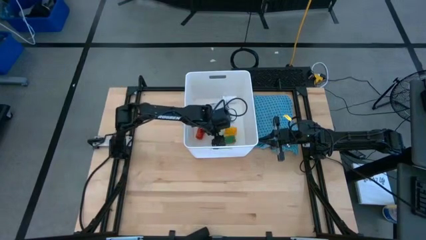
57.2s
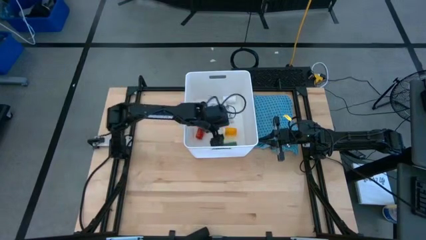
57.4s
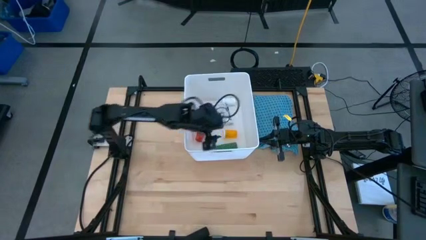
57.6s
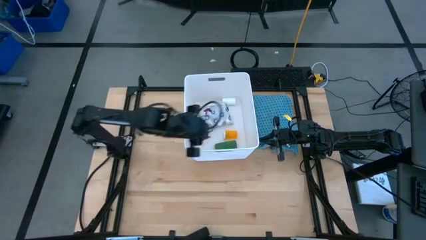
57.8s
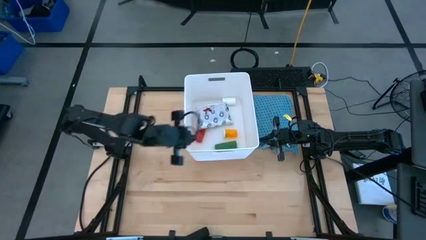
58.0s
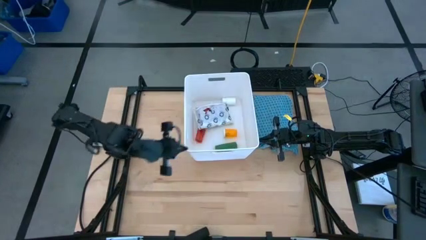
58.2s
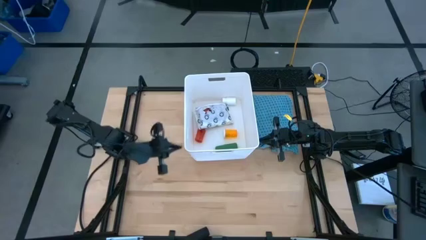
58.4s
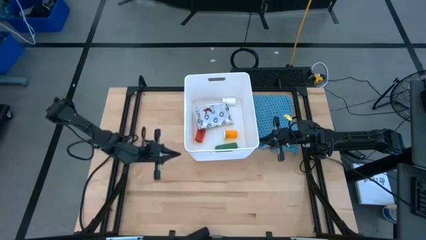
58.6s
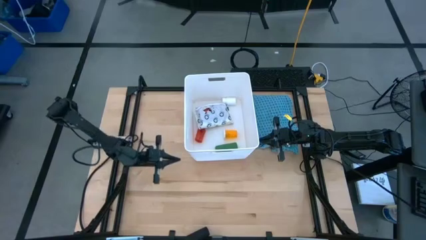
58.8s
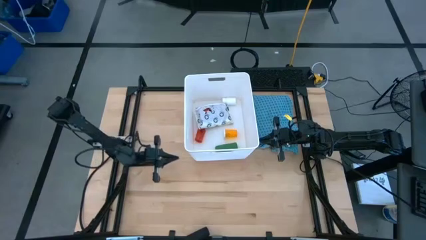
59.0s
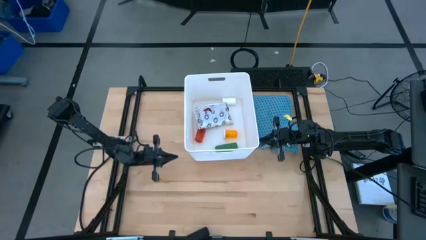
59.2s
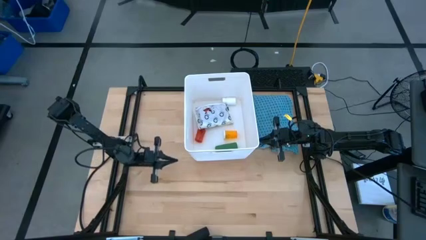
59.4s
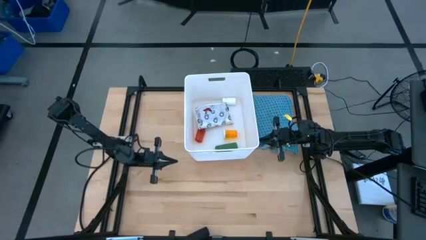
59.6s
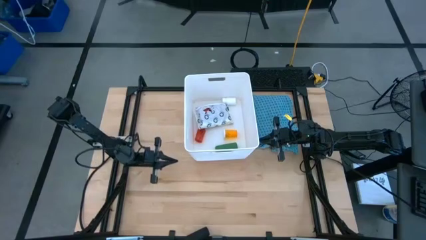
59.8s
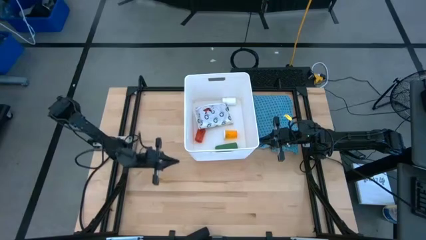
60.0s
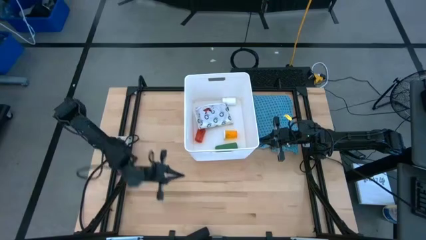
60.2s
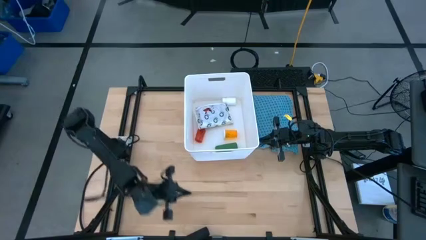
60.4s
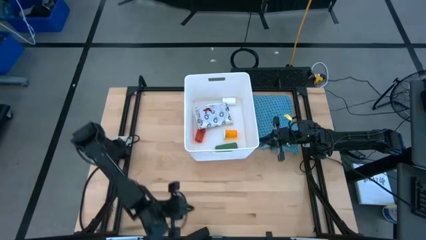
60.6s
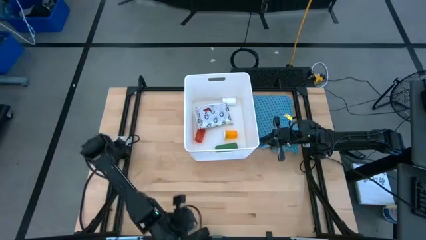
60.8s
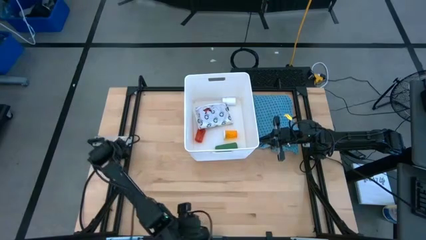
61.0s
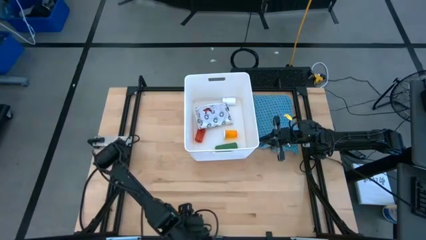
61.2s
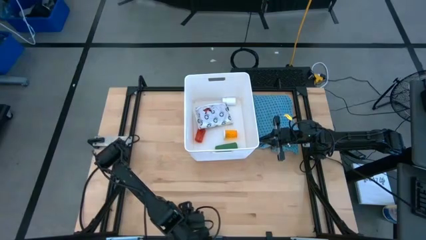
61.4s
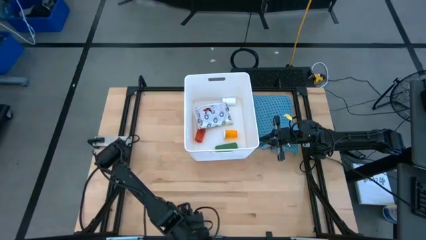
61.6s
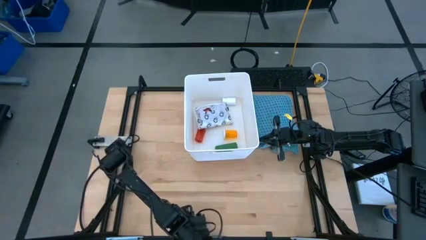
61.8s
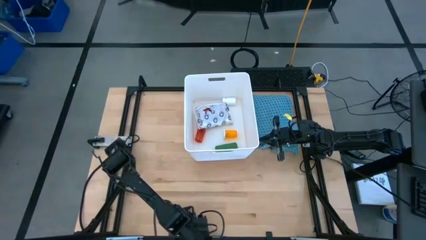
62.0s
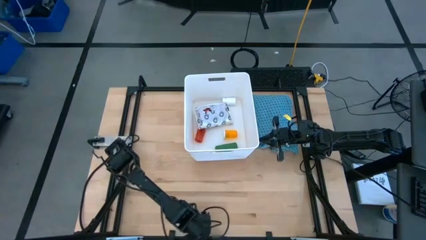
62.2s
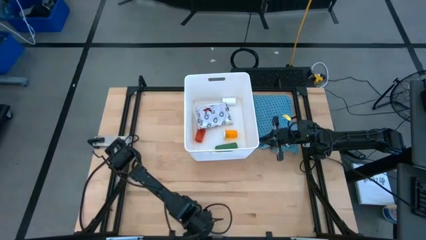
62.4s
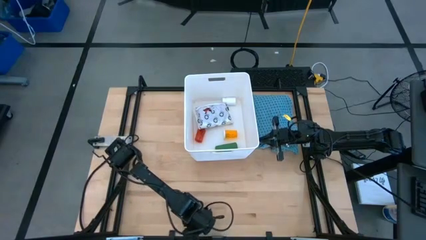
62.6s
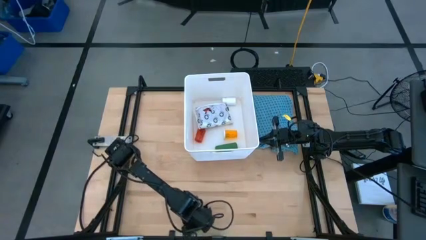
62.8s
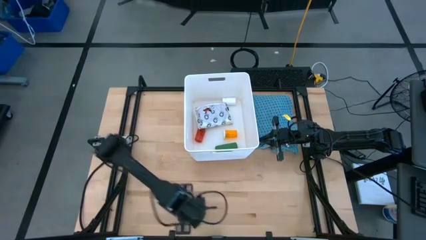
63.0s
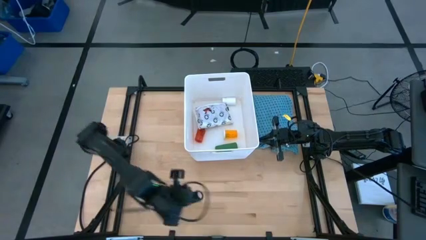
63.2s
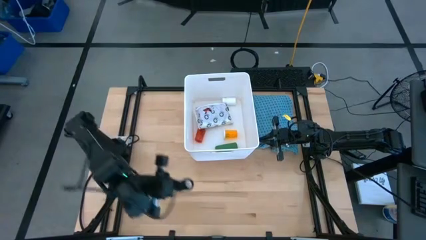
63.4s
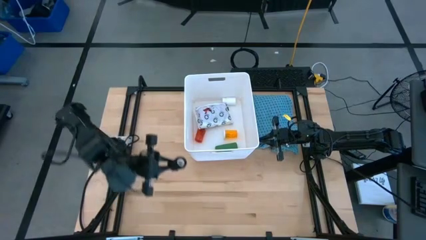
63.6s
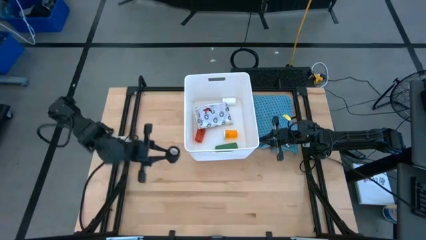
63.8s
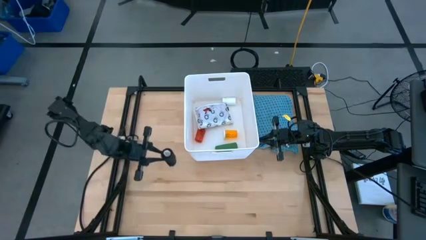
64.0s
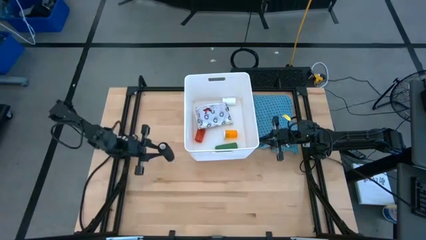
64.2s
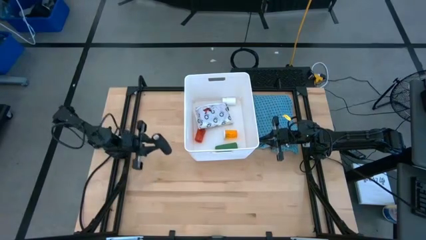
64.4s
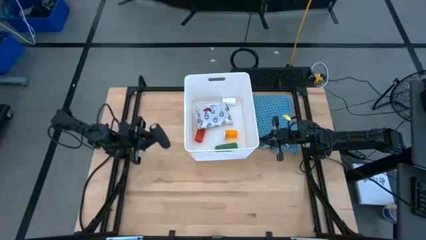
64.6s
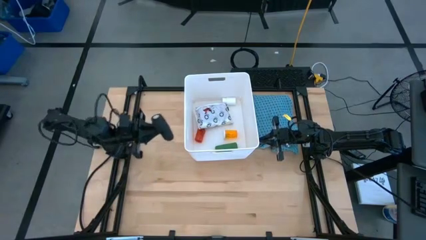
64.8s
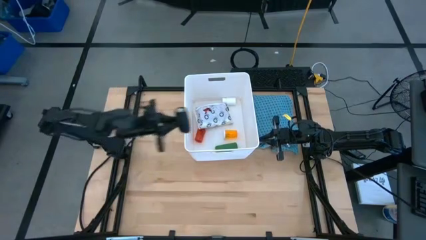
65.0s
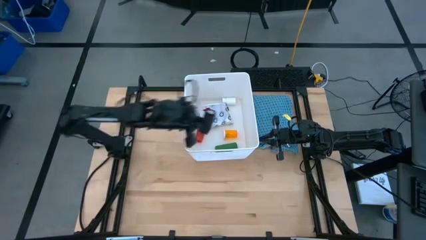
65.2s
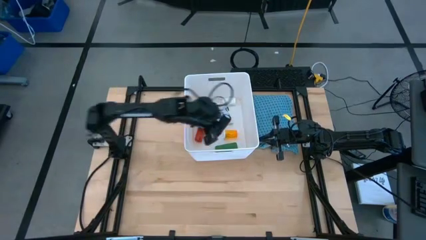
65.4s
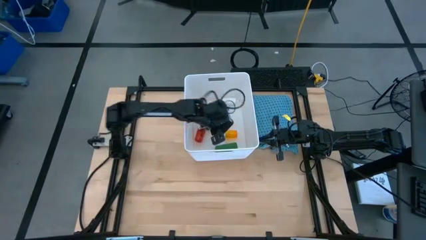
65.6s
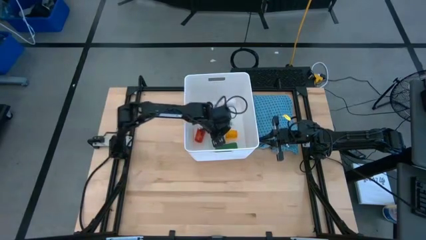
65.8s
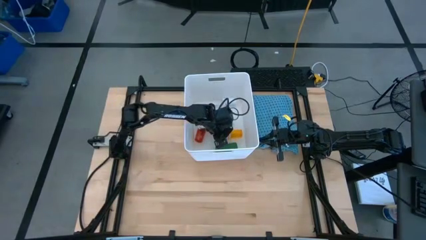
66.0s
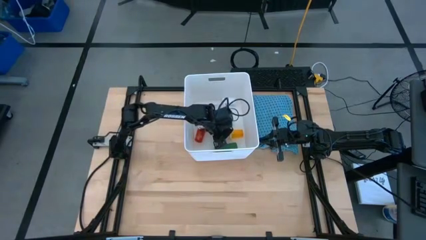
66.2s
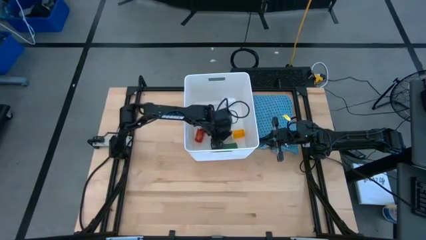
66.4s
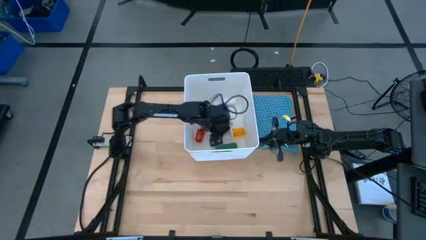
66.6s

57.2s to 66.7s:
Task: Pick & place medical supplies in basket/bin
Put the black bandage into the white bin

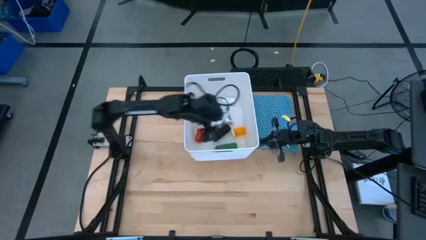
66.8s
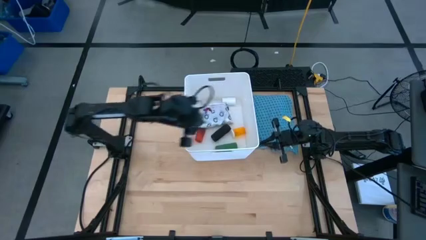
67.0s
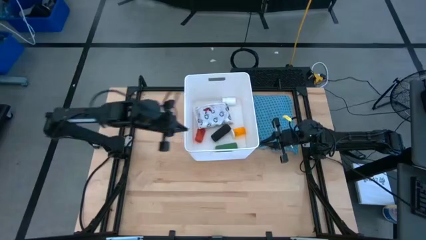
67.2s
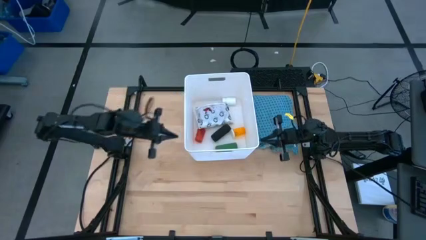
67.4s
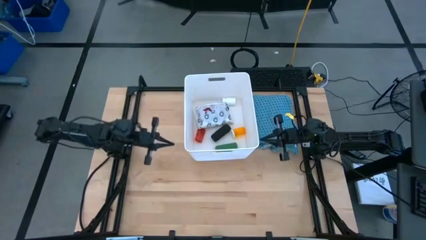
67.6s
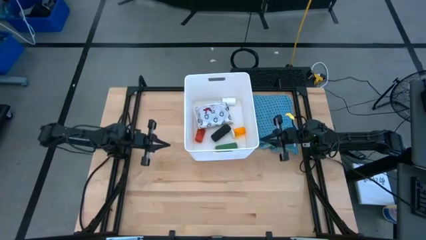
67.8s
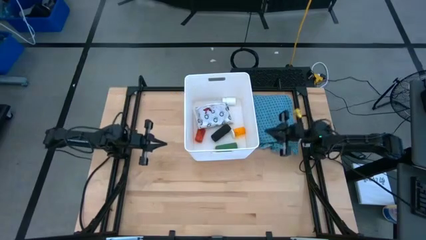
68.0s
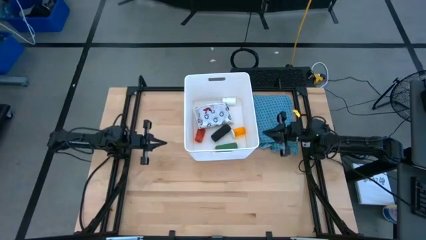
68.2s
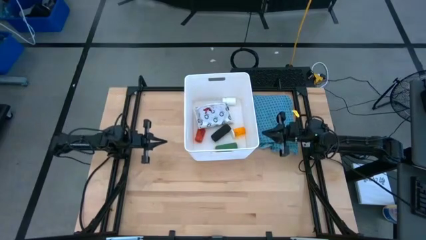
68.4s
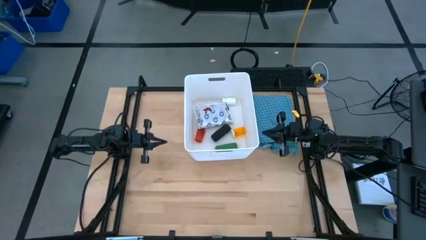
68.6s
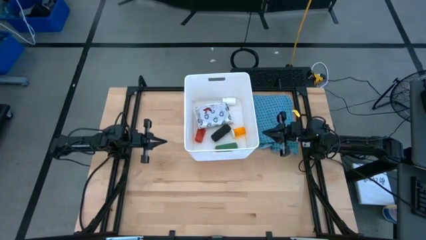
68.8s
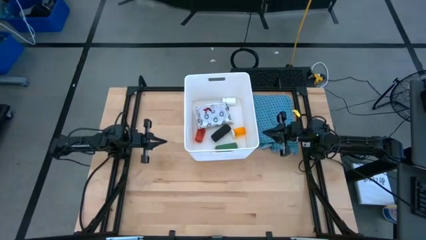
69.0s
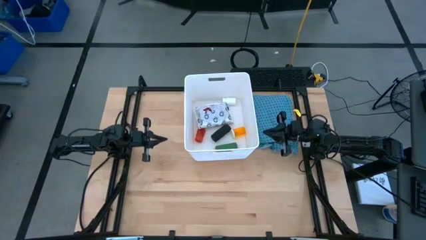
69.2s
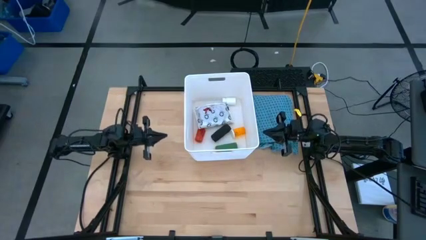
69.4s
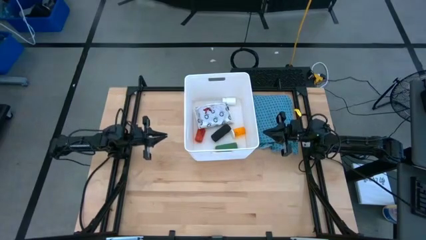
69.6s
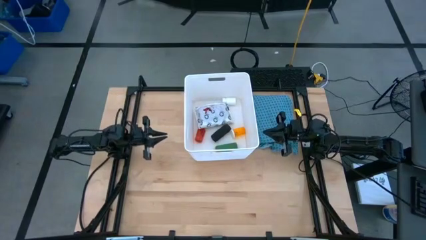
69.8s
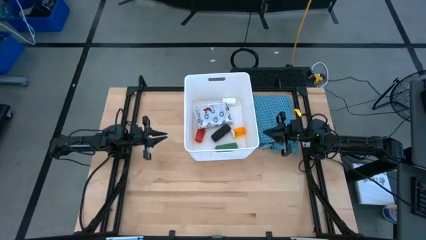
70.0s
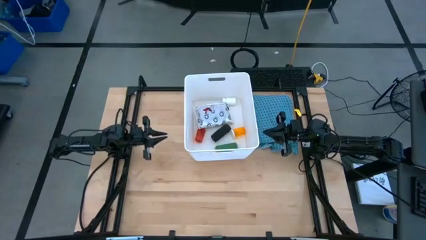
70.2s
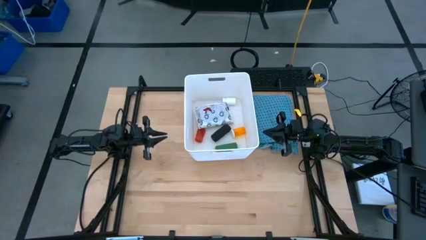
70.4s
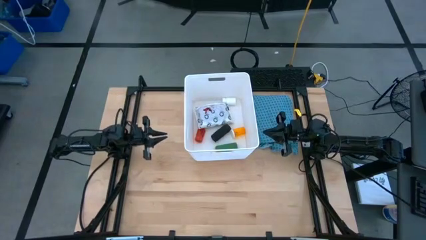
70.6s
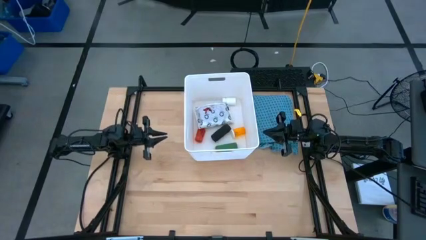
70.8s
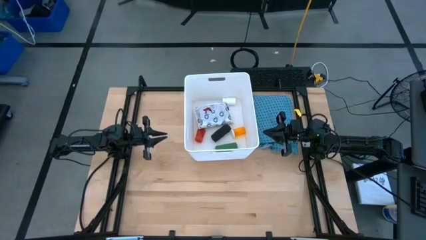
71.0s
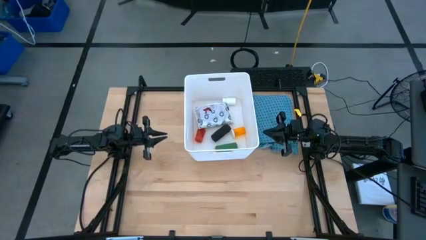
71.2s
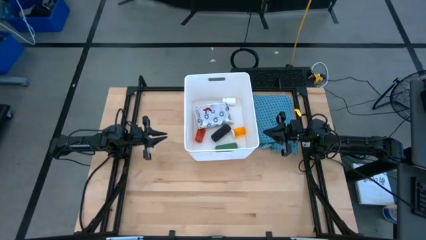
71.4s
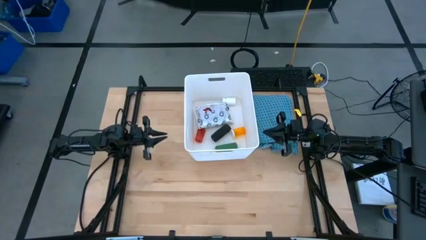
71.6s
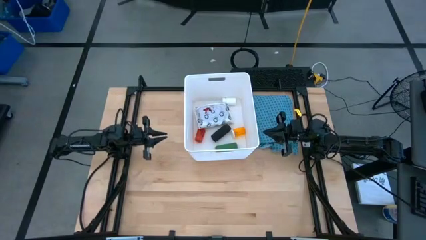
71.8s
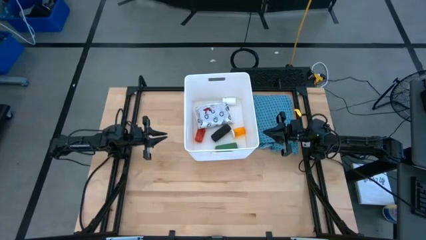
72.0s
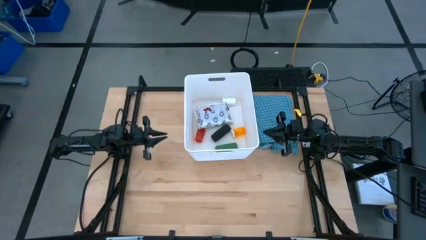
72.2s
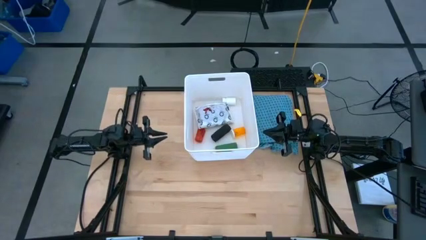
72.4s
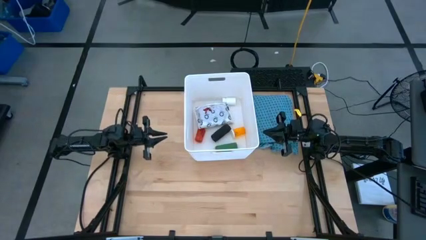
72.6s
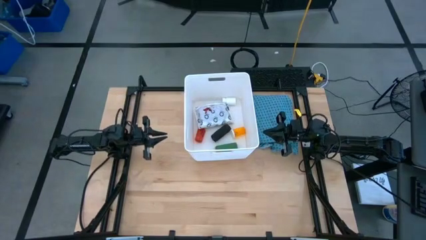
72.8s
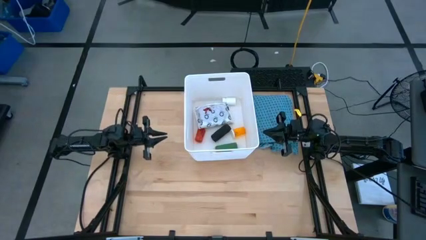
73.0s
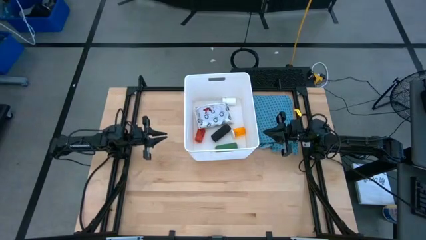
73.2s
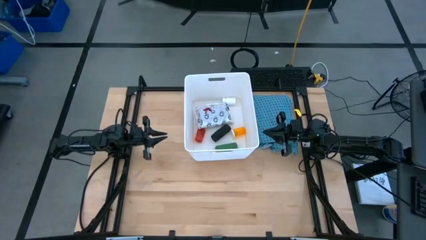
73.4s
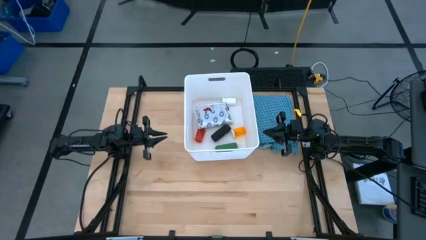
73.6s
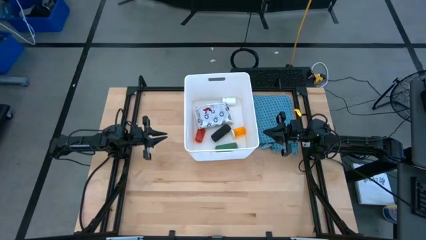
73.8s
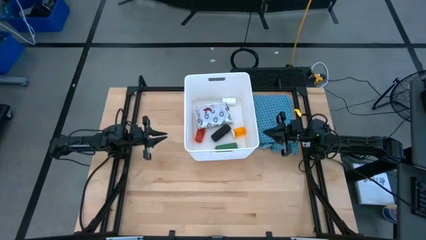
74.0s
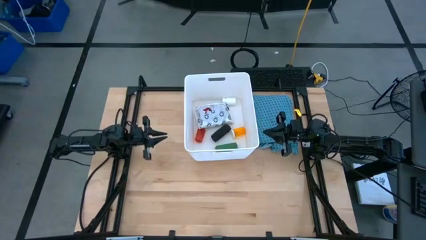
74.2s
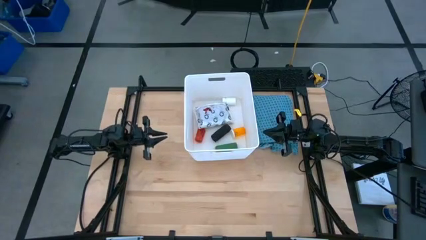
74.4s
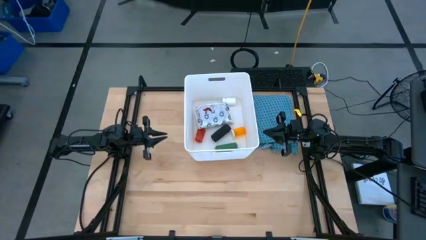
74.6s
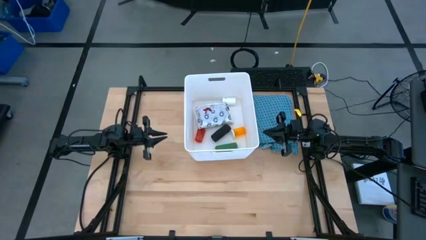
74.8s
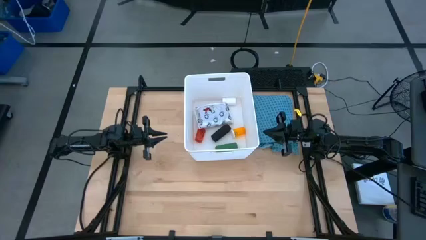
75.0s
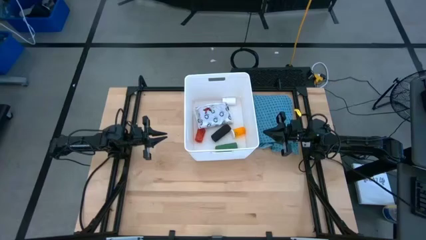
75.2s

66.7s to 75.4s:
Return to Home Position
